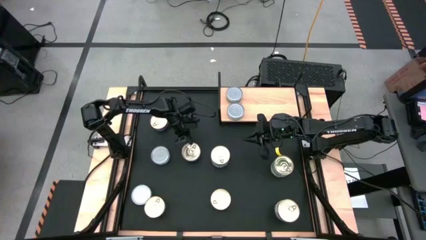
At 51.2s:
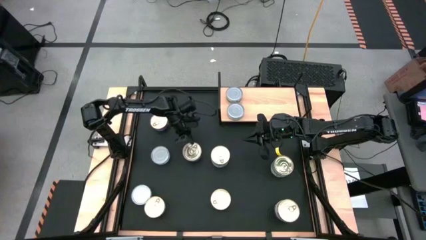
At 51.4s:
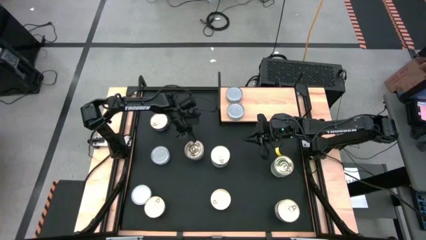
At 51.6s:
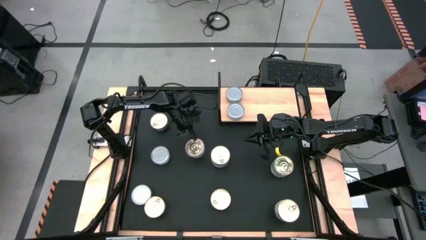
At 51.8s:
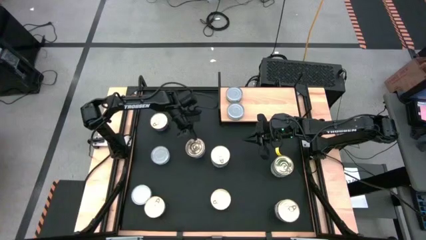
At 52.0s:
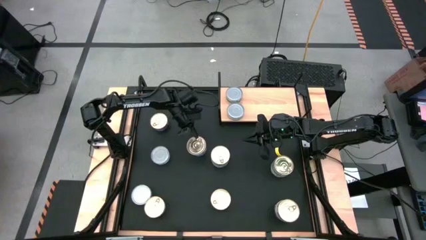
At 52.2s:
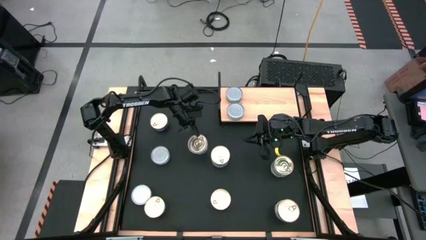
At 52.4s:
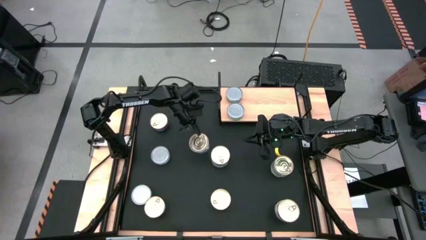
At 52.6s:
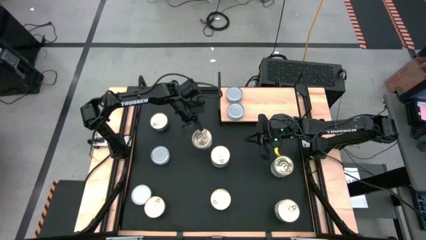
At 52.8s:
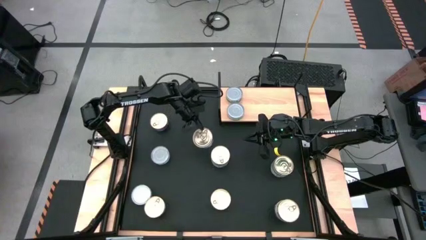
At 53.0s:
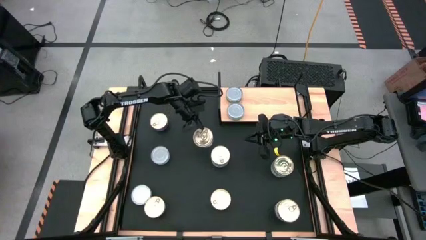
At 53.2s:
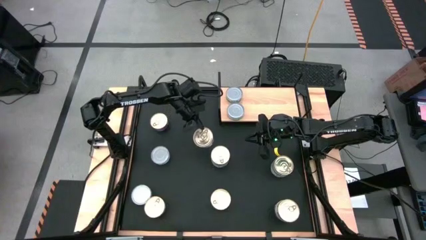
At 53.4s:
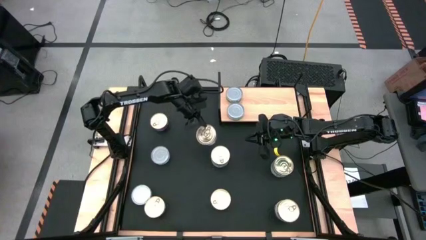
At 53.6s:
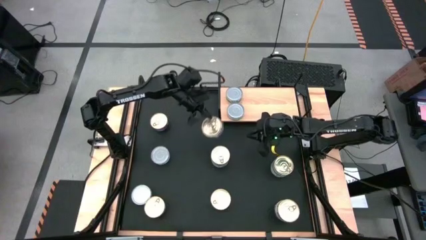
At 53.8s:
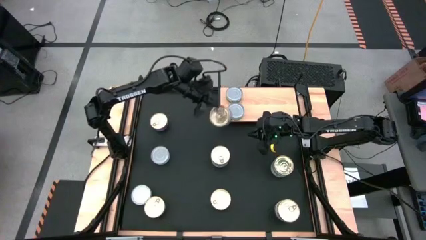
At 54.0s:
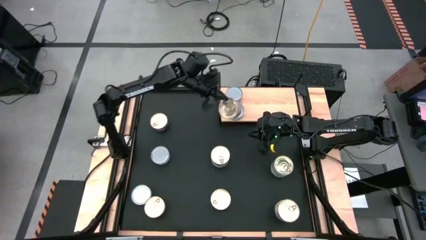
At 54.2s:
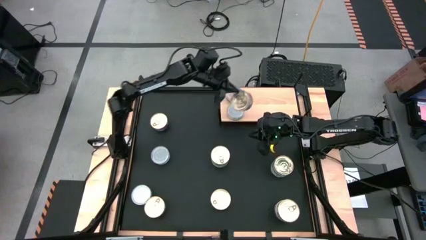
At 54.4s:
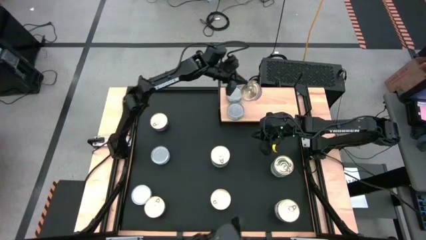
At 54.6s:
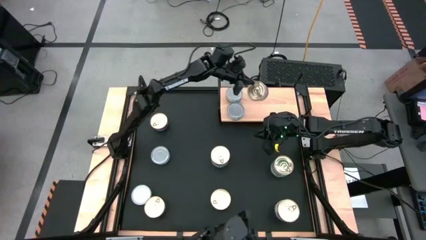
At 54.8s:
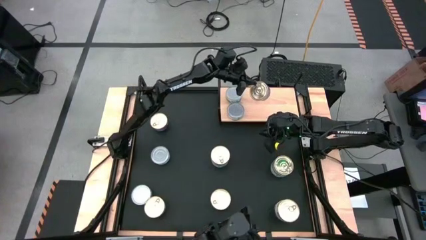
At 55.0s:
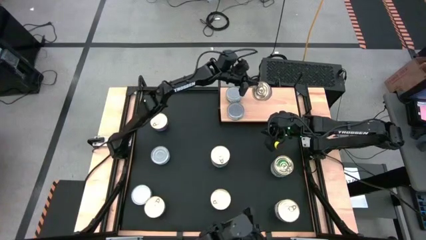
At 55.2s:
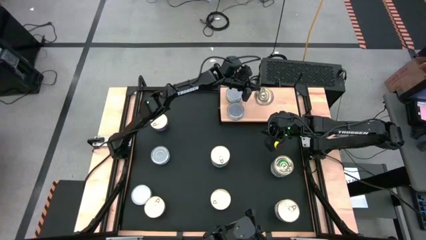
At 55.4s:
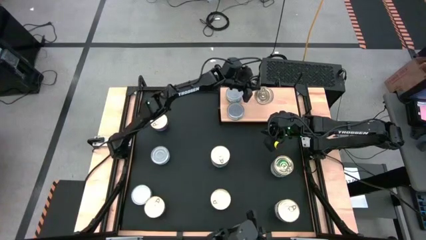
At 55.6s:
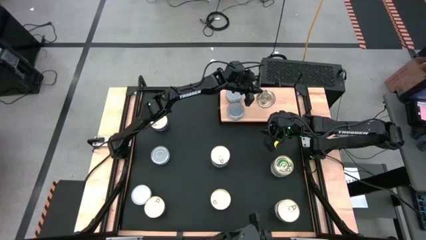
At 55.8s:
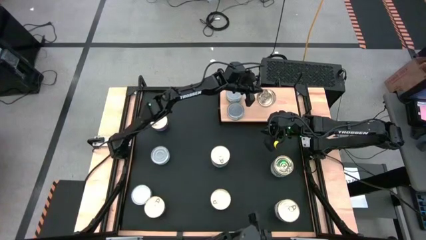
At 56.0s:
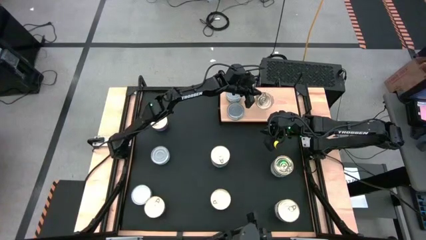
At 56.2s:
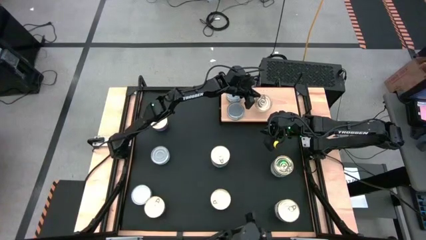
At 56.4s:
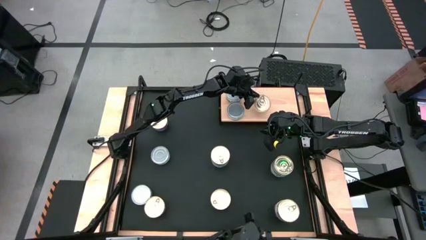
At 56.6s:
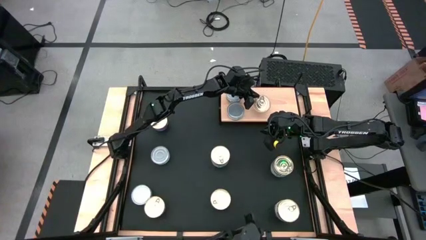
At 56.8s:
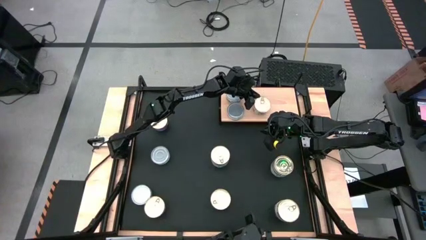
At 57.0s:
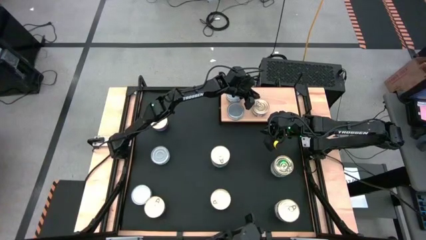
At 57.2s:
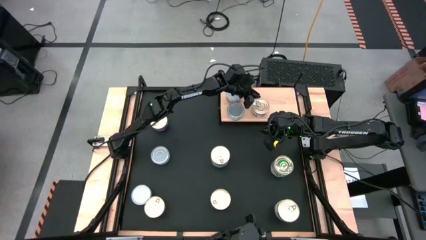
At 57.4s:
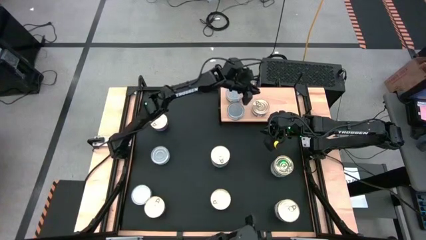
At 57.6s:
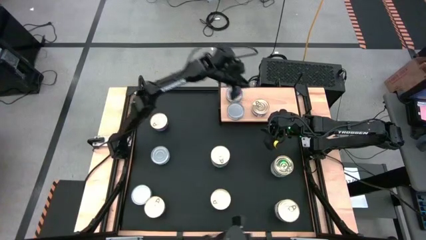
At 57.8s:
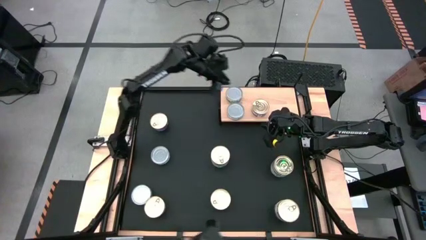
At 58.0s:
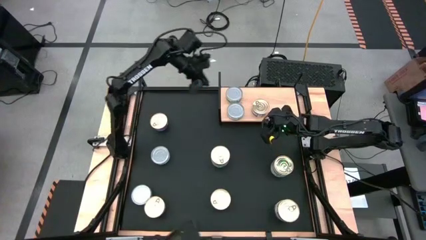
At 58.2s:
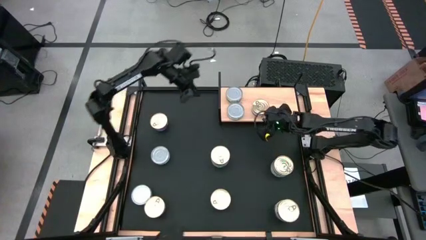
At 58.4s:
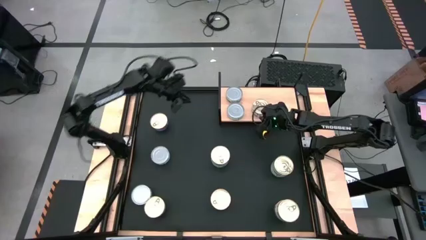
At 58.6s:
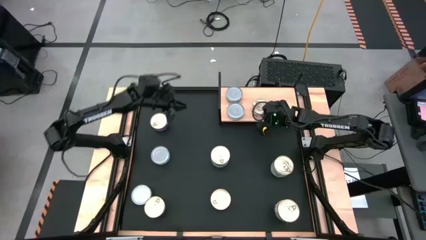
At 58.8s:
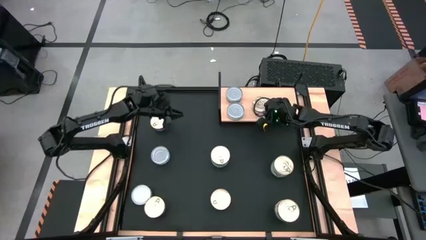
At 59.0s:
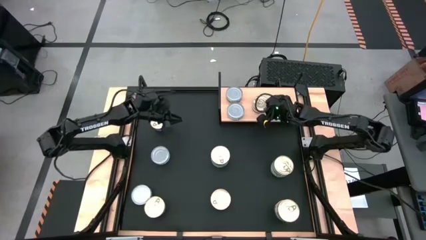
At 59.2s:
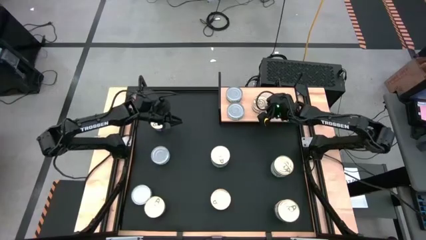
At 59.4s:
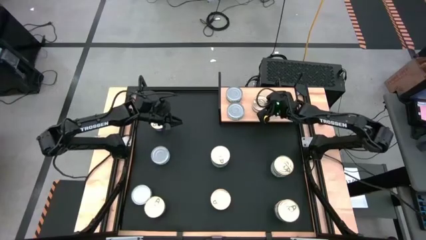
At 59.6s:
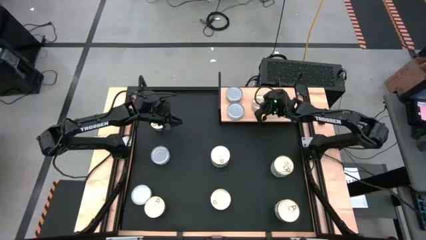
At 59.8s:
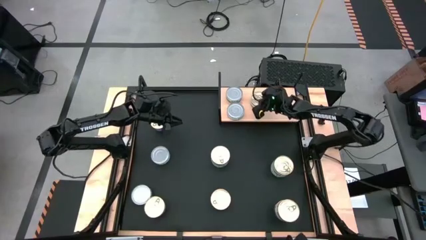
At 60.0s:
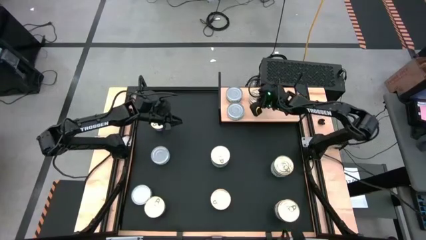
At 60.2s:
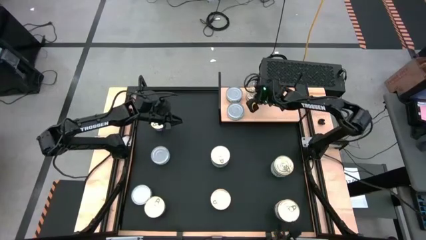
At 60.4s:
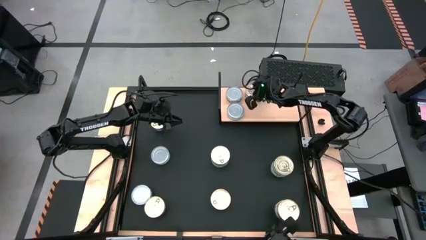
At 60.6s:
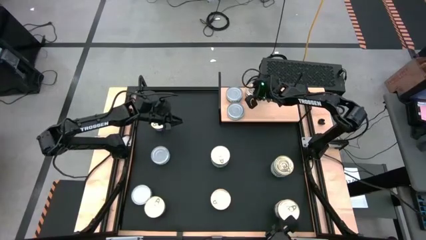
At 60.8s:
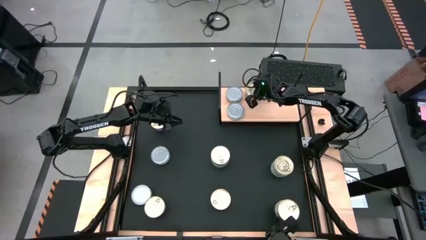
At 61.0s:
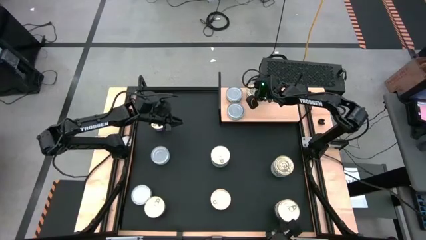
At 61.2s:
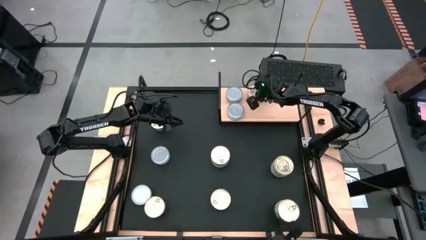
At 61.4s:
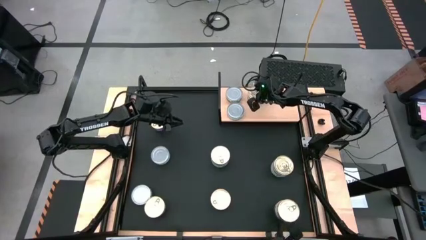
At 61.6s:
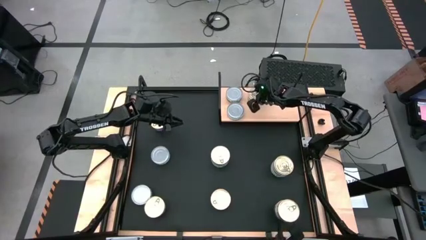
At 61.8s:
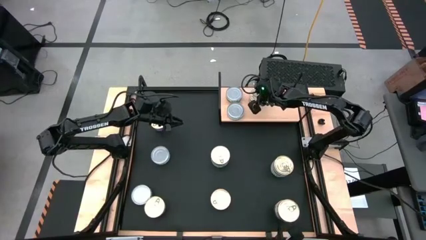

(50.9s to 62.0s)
Task: Stack canned seafood by type on shelf
Put the blue pink tuna can on the shelf

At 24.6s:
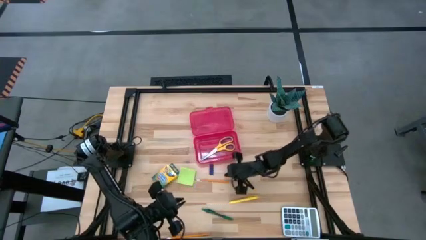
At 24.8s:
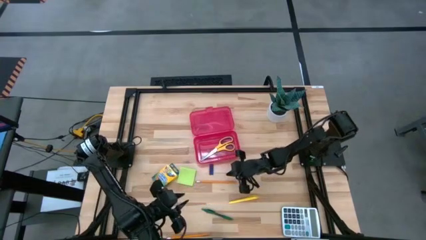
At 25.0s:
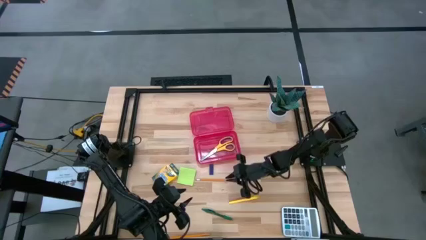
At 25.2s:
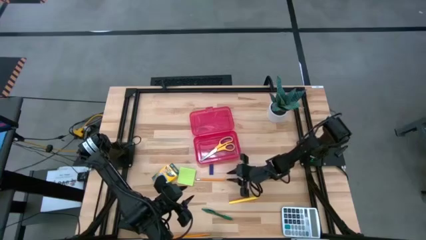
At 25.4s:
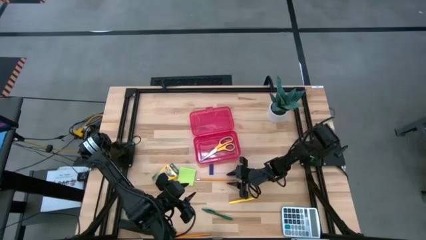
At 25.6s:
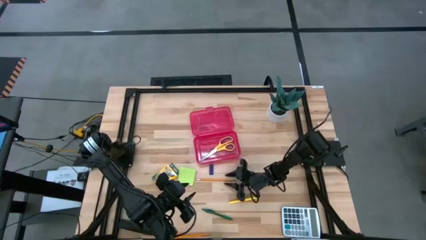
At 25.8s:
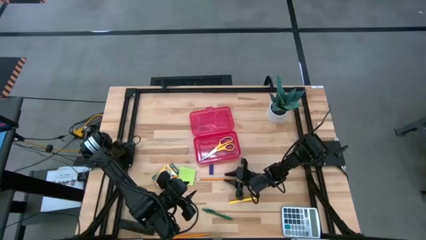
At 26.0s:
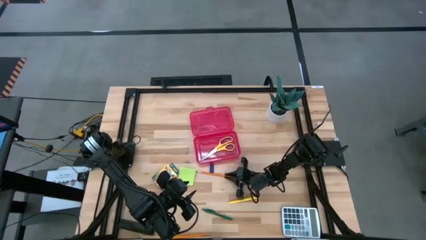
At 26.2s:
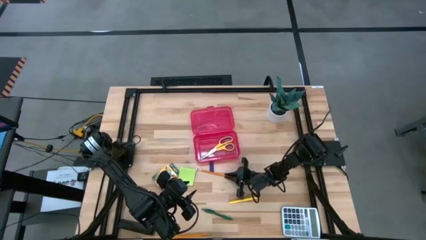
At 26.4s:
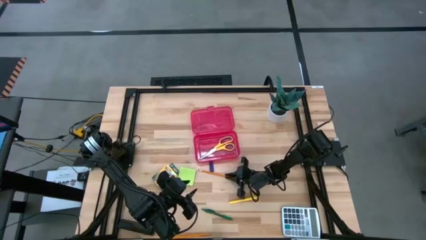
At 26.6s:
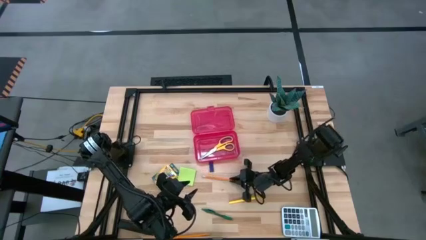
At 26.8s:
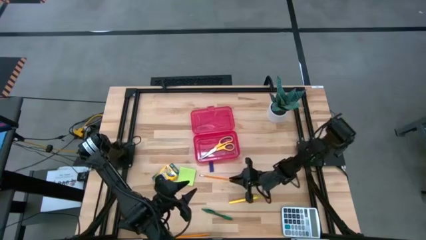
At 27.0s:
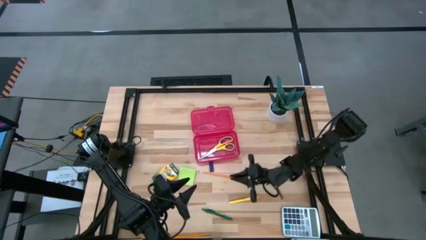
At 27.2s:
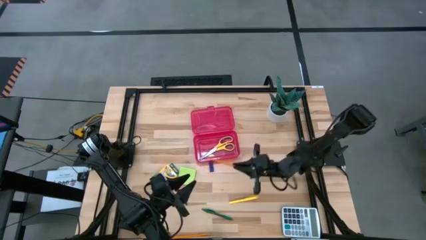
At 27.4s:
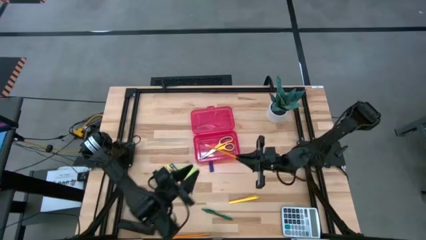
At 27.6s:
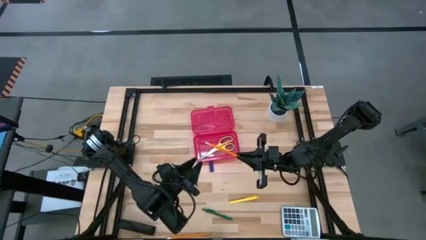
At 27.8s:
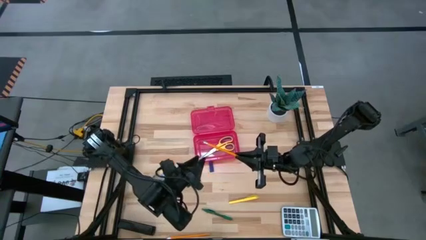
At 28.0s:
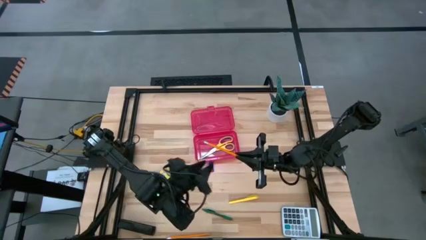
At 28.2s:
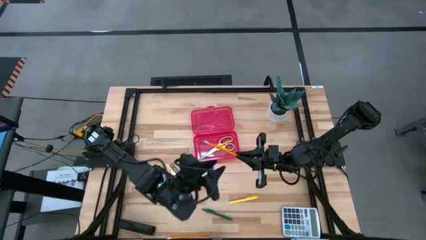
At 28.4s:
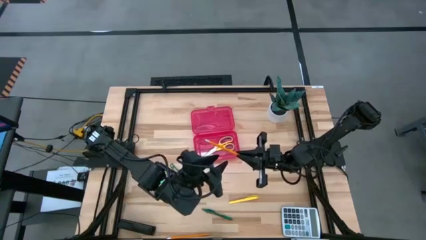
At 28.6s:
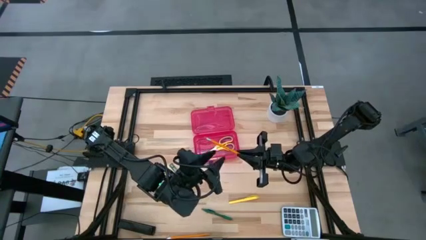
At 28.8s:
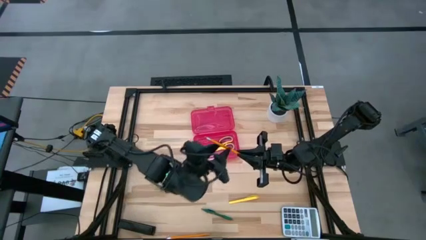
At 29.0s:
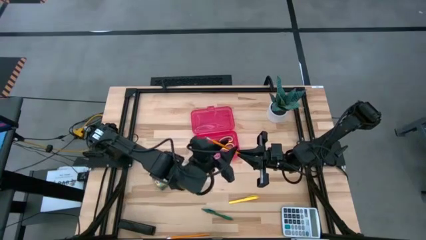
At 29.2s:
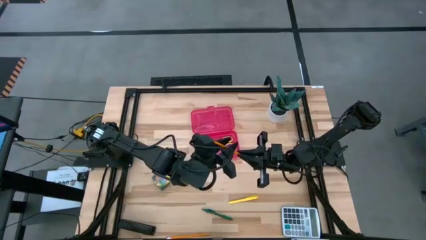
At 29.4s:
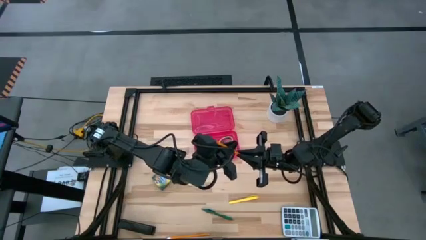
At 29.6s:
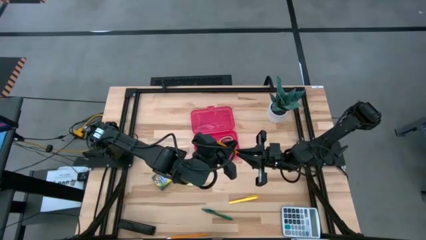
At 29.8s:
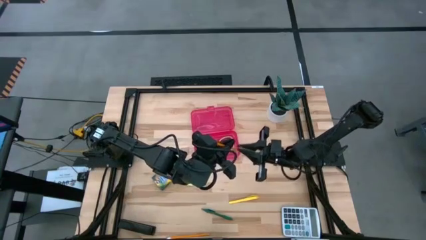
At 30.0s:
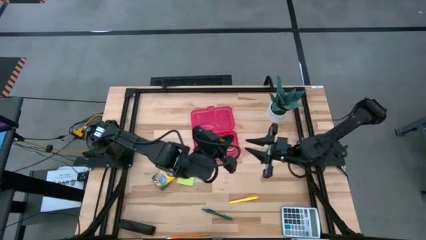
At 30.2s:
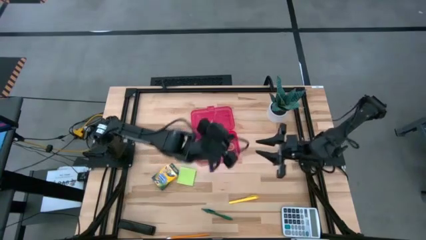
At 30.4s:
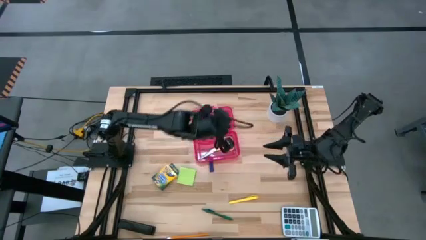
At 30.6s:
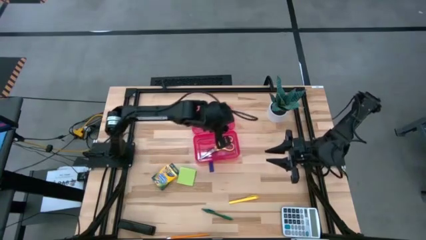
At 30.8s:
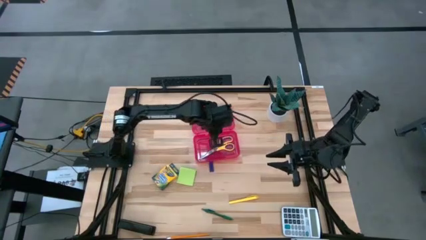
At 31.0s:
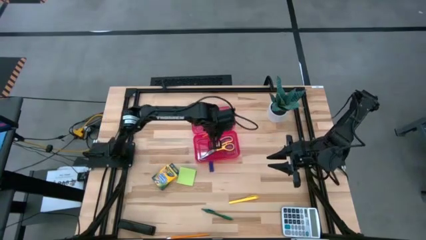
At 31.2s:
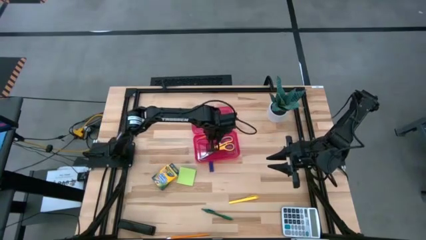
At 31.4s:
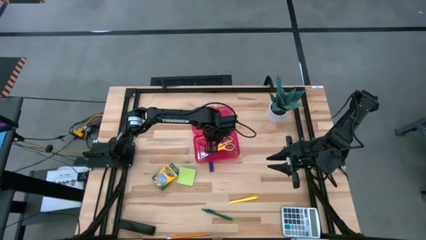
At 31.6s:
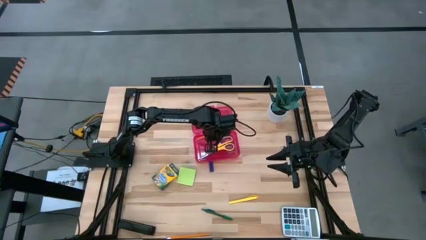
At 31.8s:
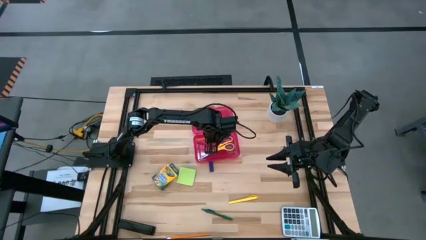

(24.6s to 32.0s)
Task: Pack school essentials
Put the top orange pencil into the supply box
